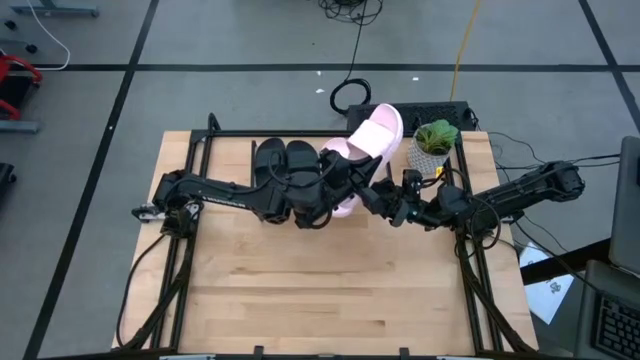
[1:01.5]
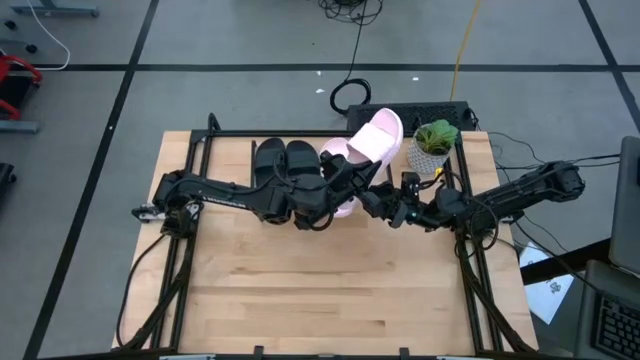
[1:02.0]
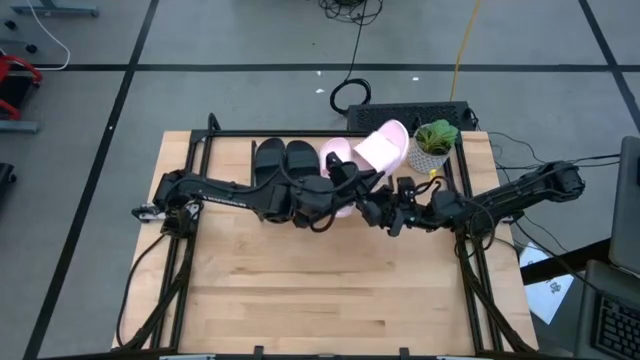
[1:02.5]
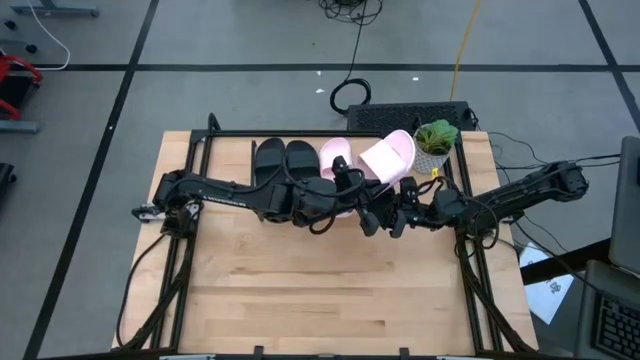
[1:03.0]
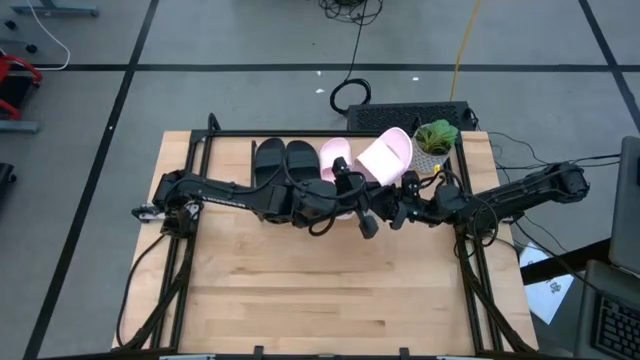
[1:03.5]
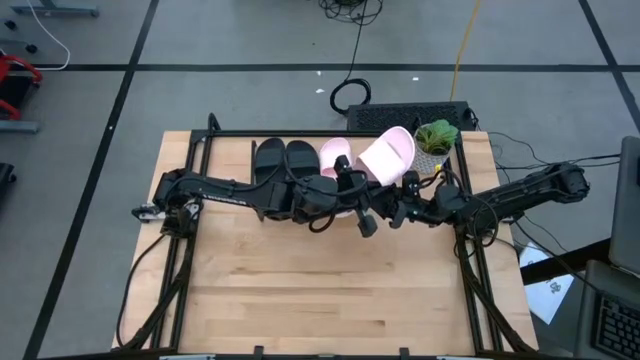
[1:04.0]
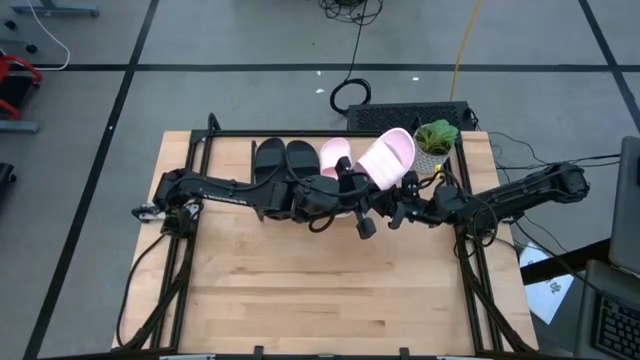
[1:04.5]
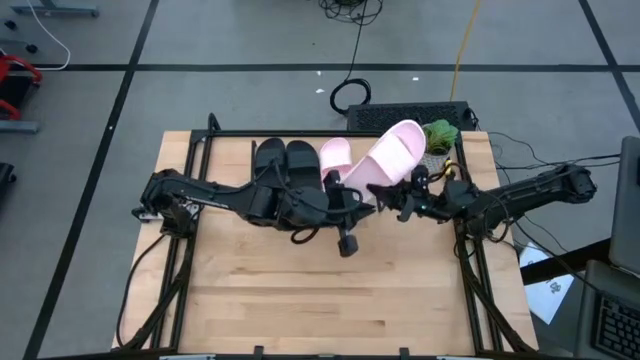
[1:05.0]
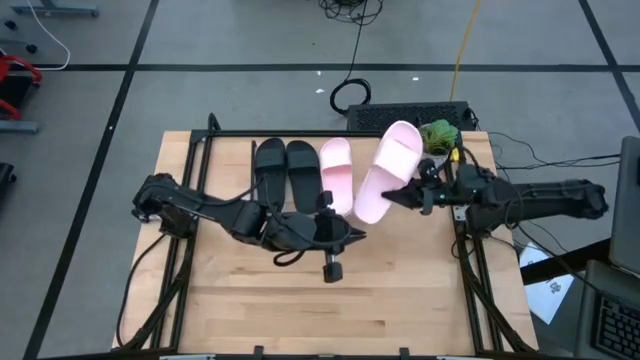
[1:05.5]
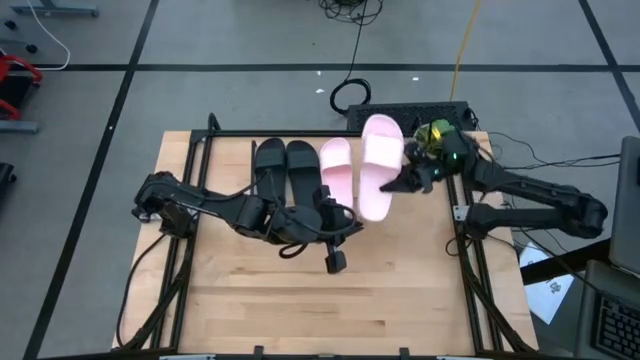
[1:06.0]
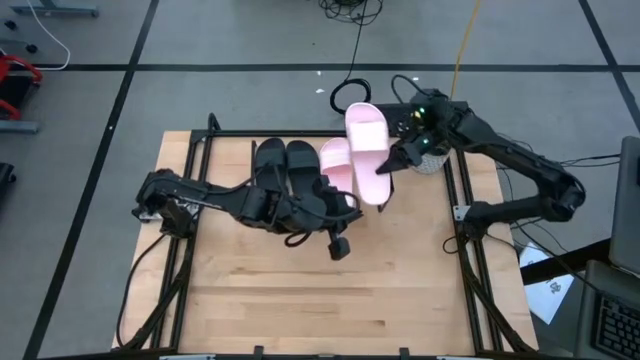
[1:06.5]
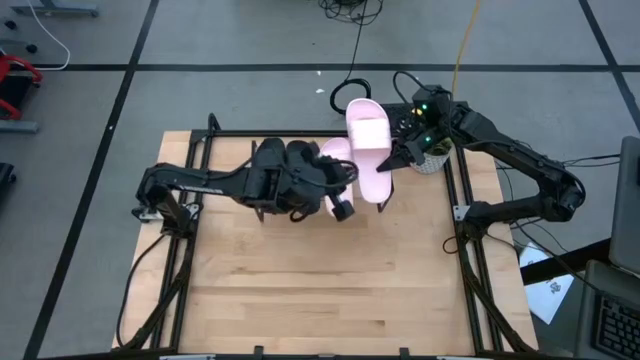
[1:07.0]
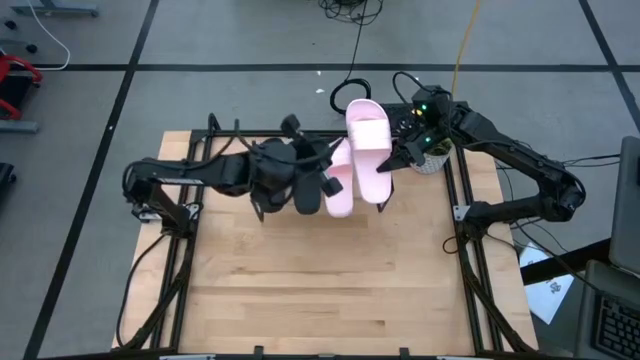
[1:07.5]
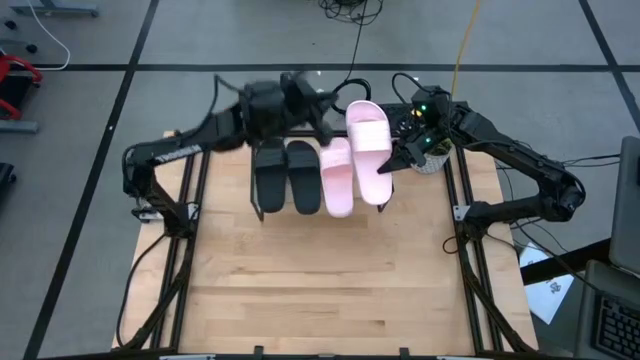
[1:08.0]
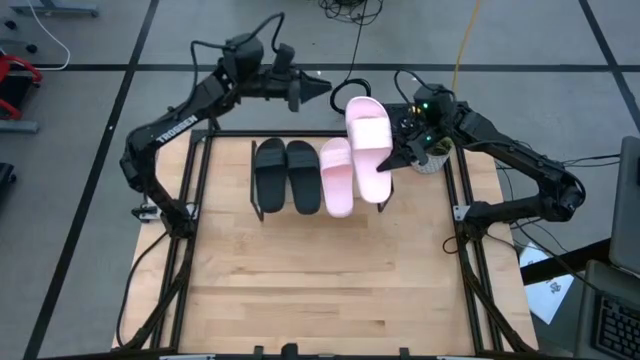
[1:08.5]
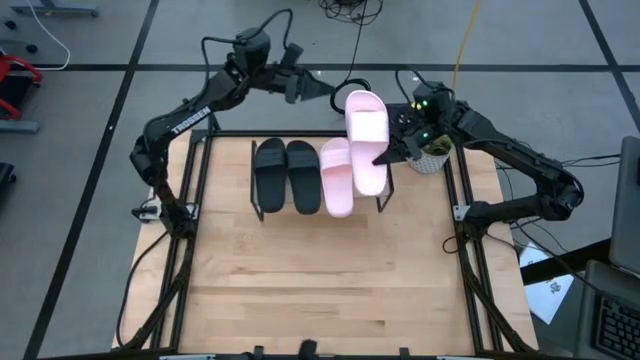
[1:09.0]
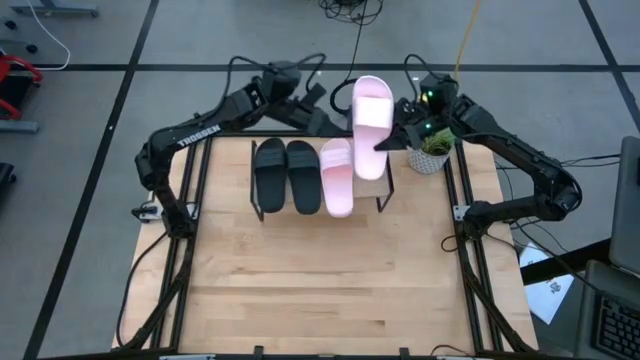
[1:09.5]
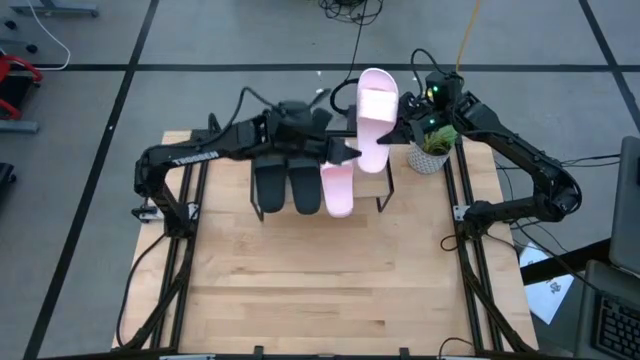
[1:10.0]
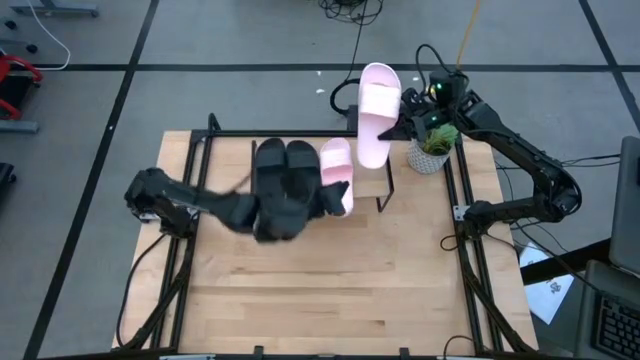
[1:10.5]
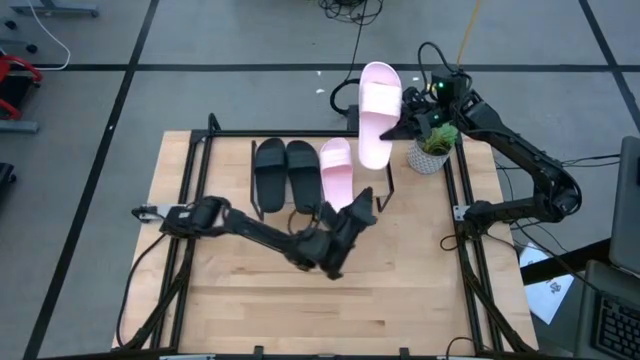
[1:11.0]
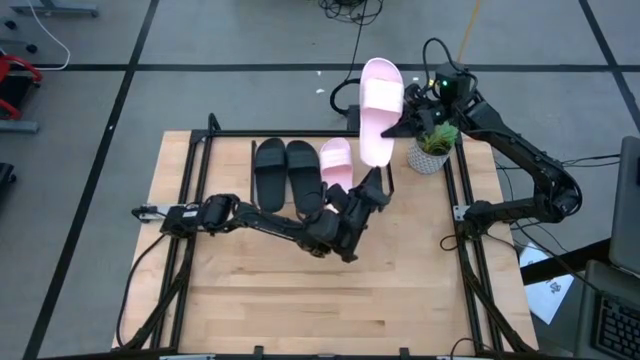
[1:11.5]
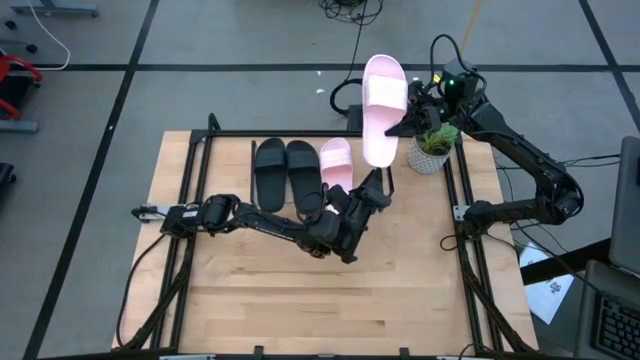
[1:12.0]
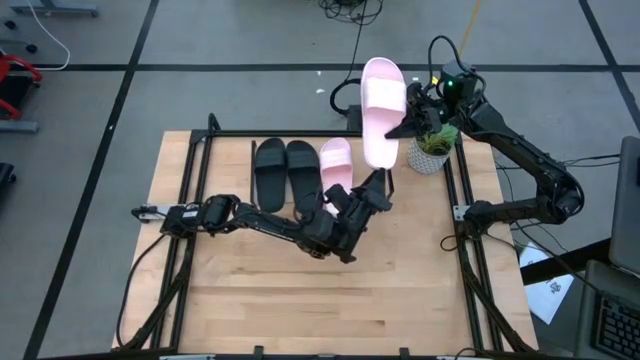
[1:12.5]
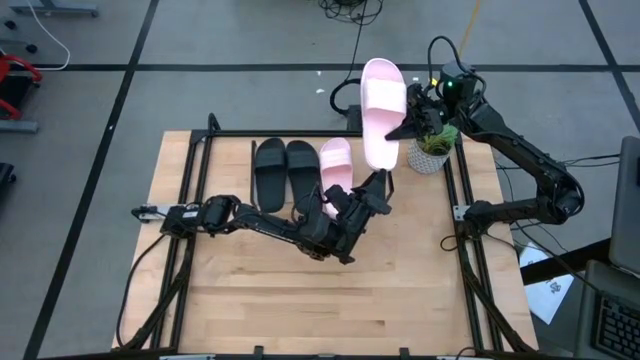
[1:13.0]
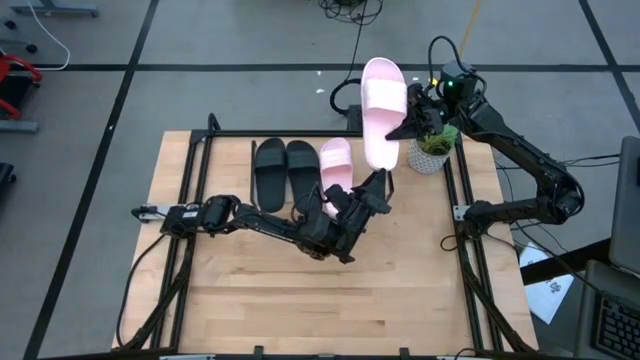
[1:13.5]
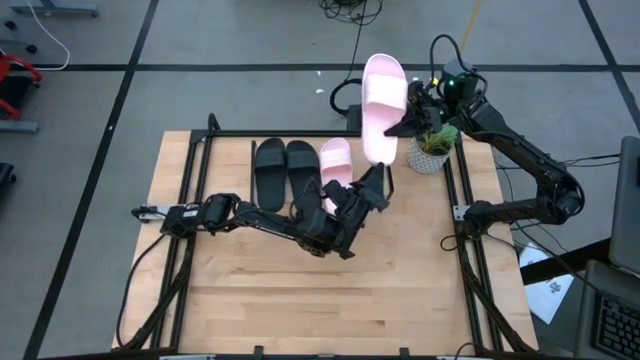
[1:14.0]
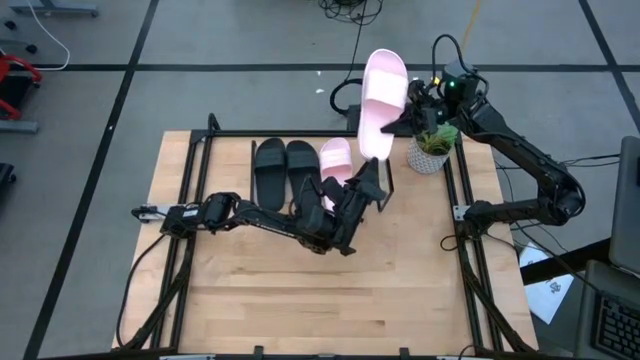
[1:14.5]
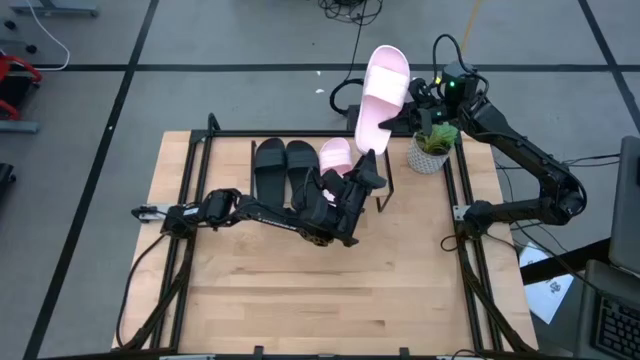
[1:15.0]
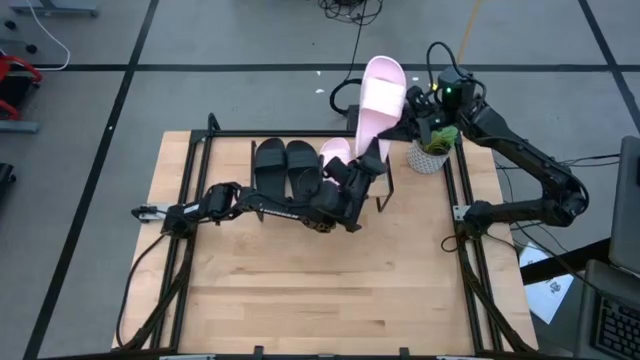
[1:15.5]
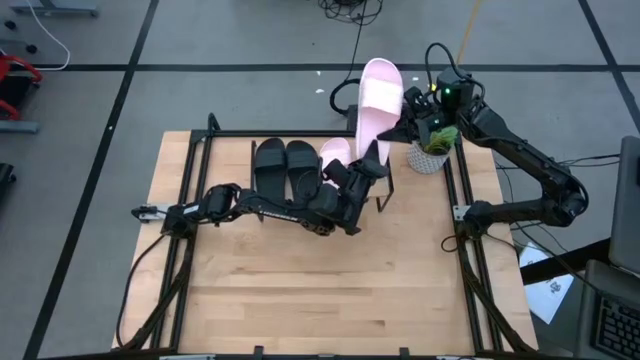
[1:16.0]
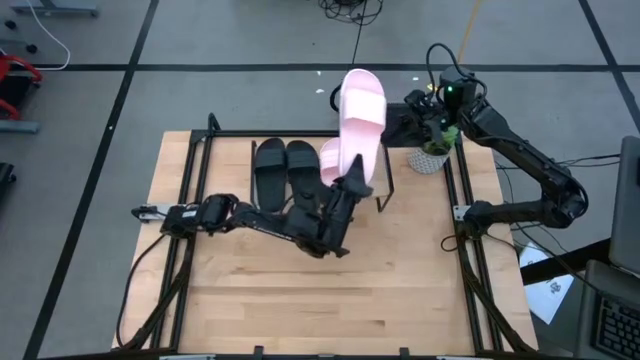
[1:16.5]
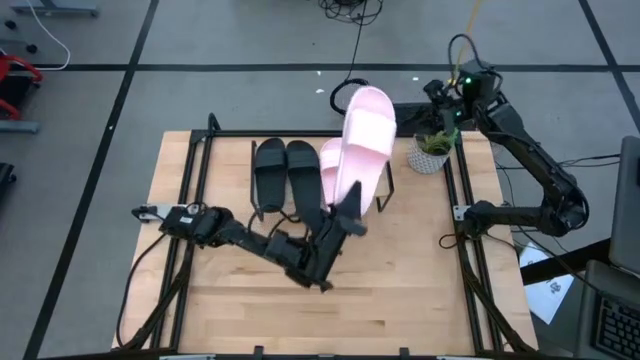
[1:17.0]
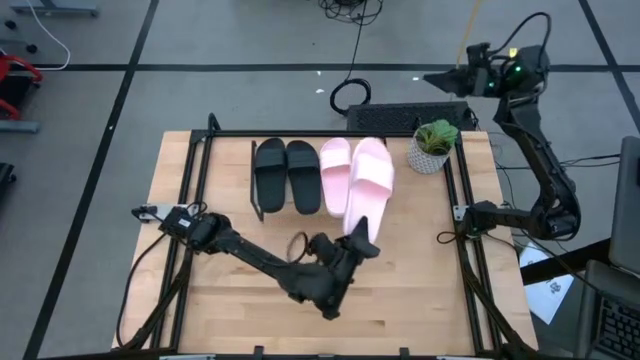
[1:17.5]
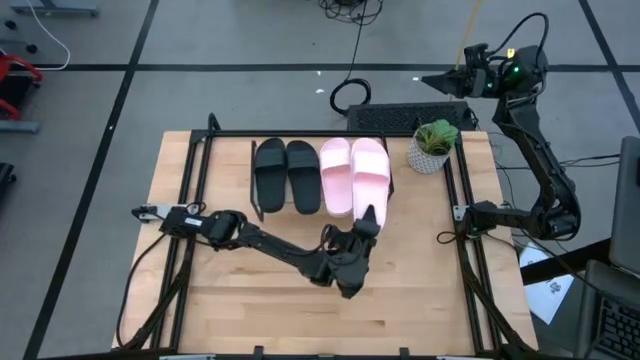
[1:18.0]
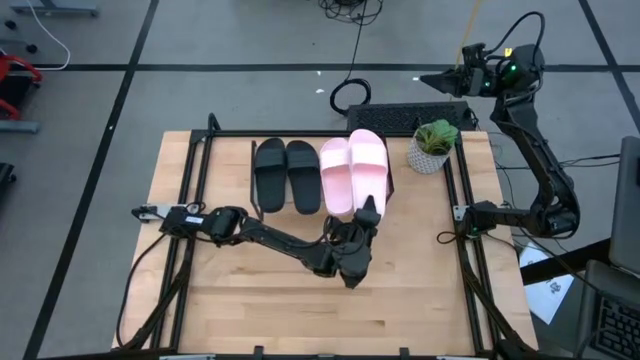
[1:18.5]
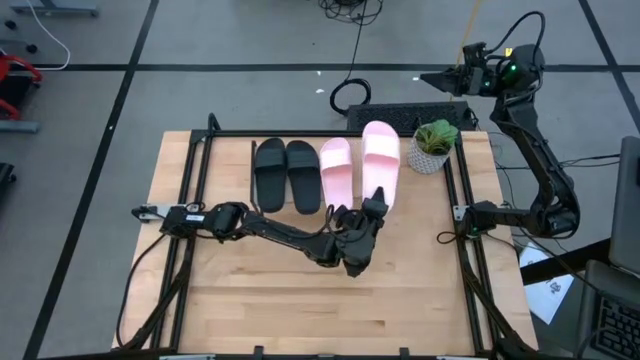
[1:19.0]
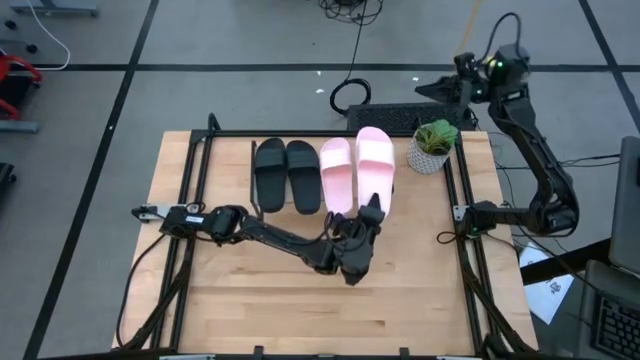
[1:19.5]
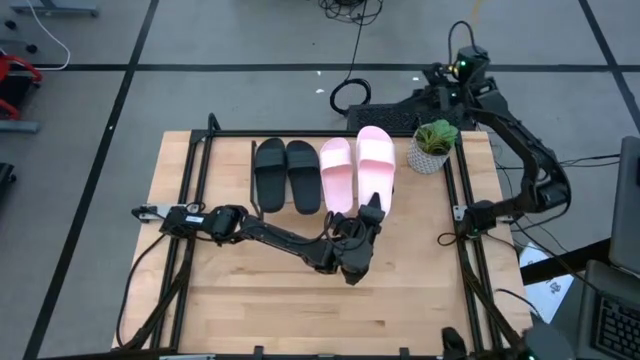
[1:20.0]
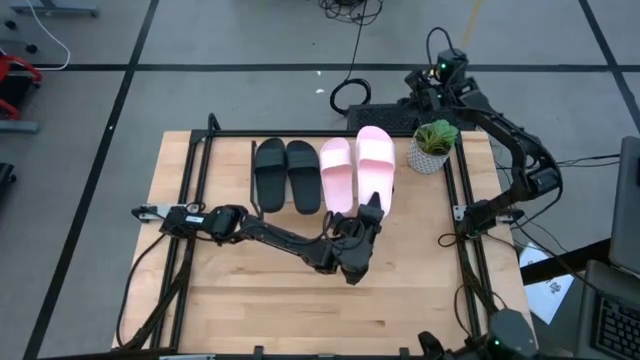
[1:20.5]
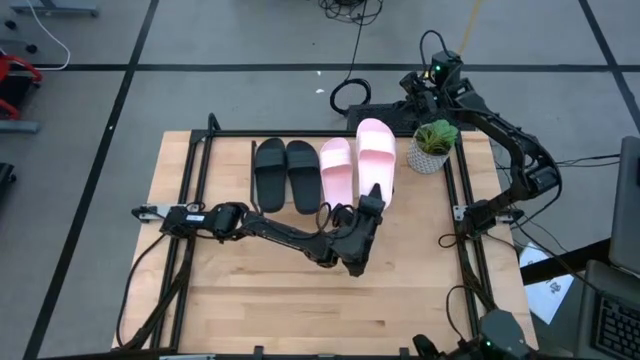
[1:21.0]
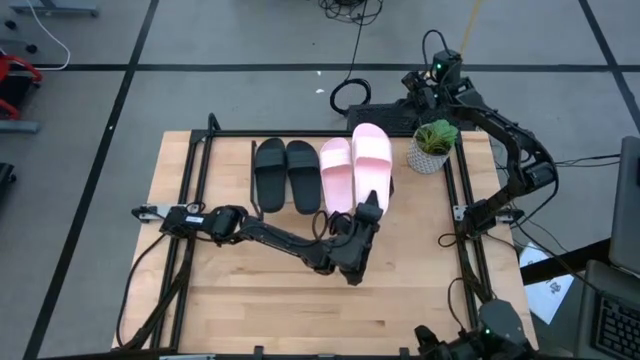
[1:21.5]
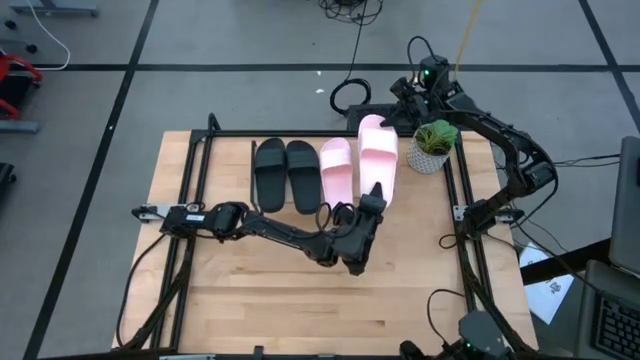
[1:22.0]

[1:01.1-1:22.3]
Task: Pick and place slides into the shelf
Put the pink slipper onto the shelf
